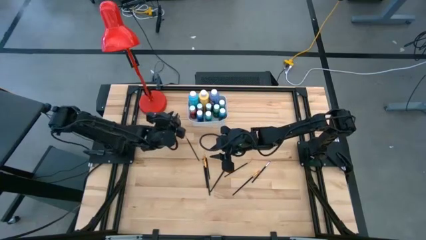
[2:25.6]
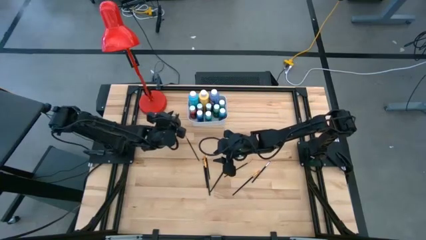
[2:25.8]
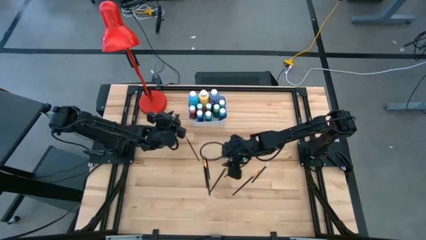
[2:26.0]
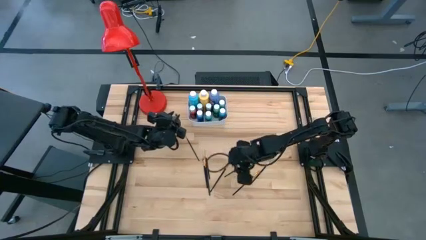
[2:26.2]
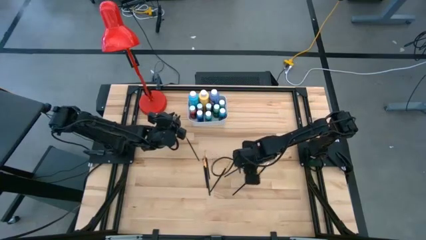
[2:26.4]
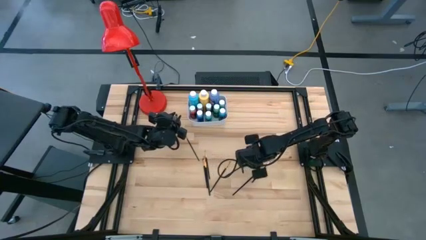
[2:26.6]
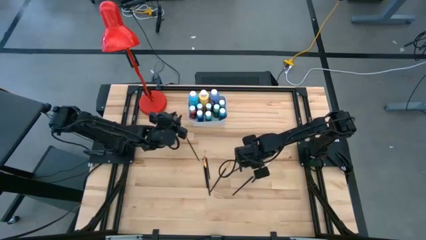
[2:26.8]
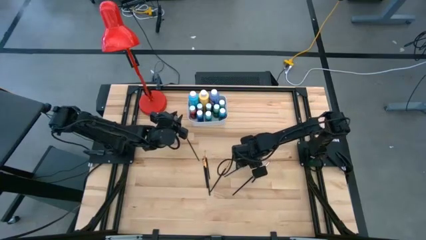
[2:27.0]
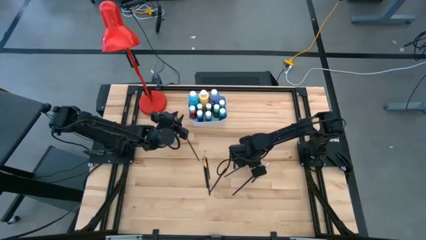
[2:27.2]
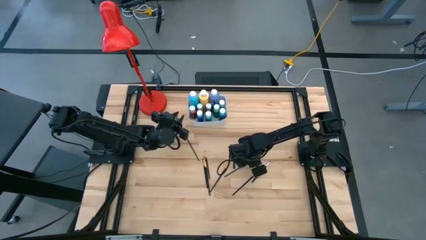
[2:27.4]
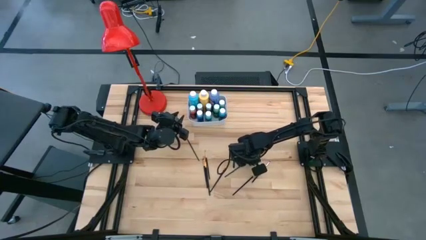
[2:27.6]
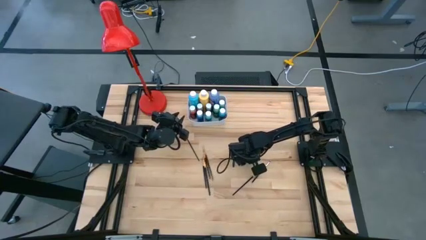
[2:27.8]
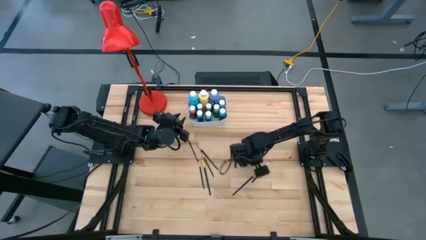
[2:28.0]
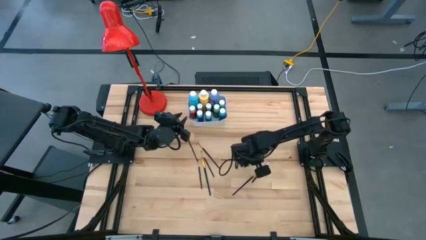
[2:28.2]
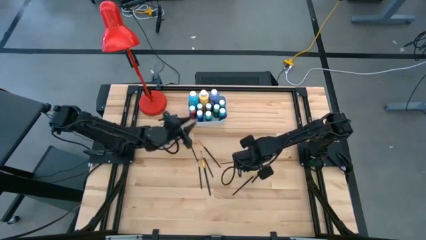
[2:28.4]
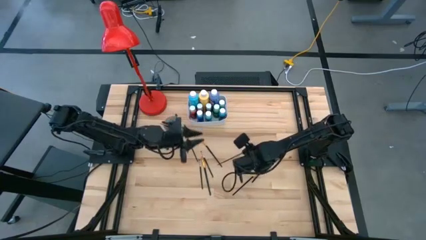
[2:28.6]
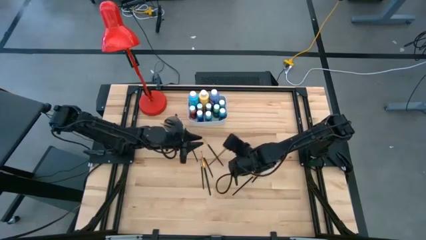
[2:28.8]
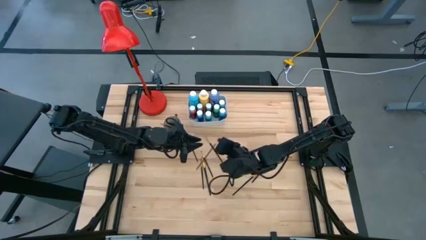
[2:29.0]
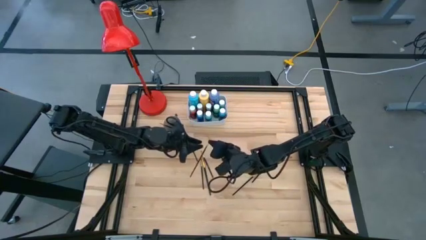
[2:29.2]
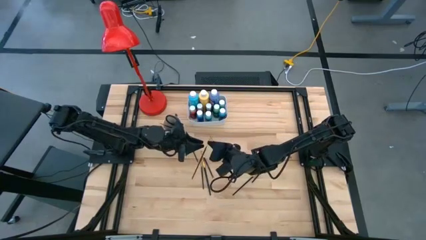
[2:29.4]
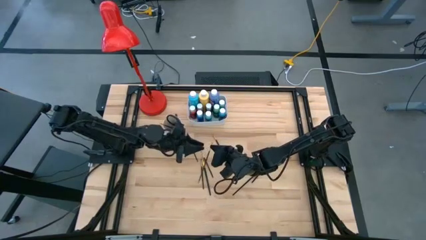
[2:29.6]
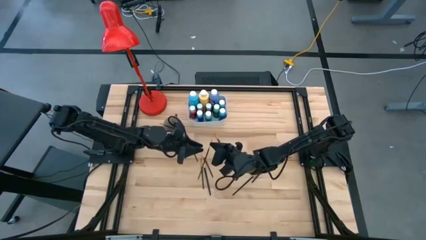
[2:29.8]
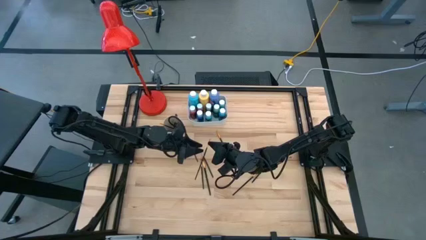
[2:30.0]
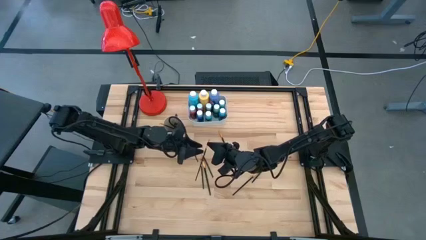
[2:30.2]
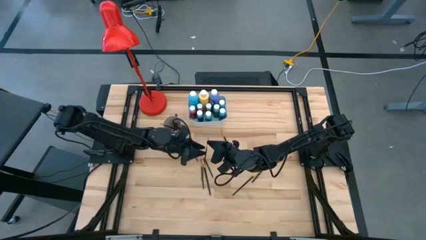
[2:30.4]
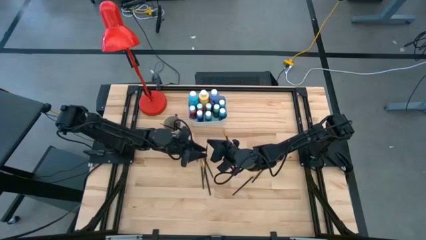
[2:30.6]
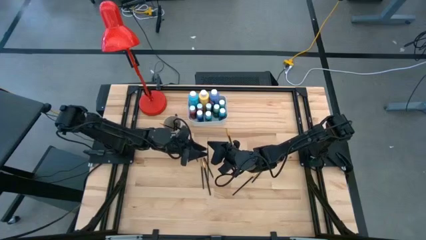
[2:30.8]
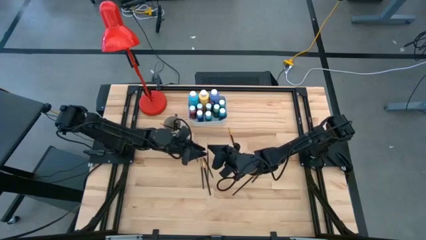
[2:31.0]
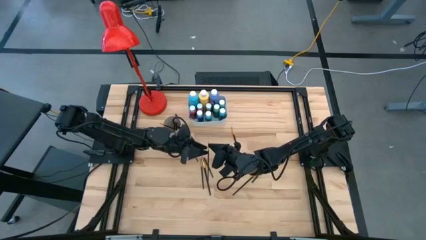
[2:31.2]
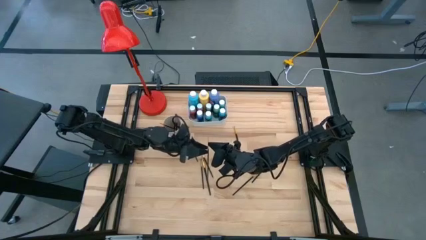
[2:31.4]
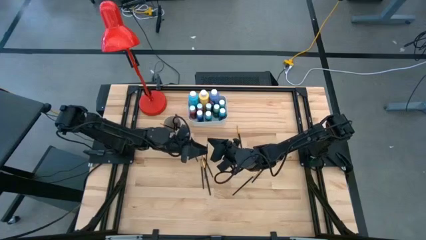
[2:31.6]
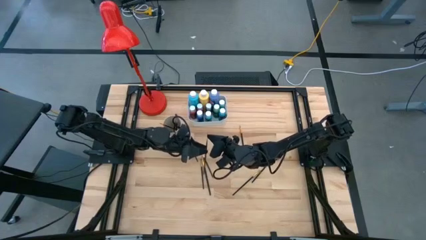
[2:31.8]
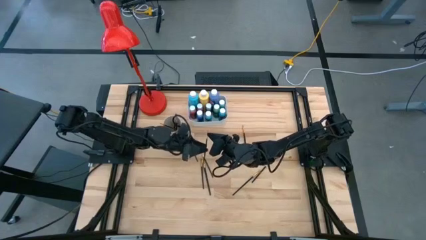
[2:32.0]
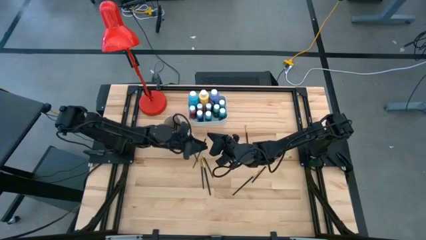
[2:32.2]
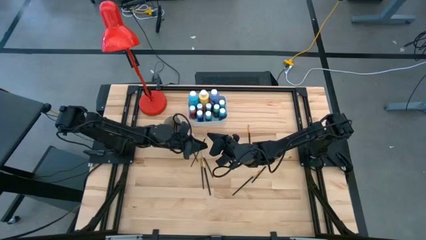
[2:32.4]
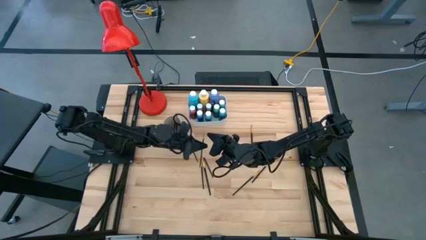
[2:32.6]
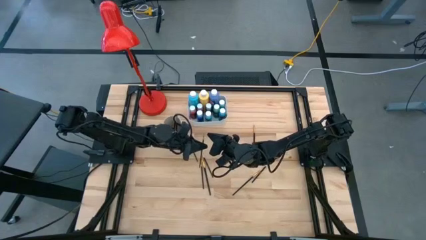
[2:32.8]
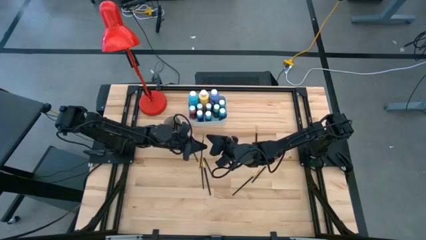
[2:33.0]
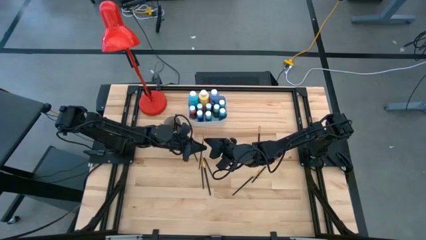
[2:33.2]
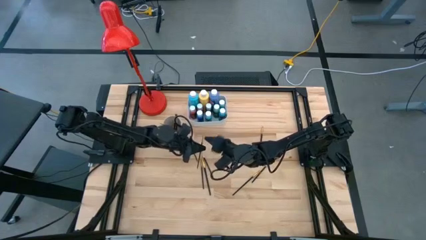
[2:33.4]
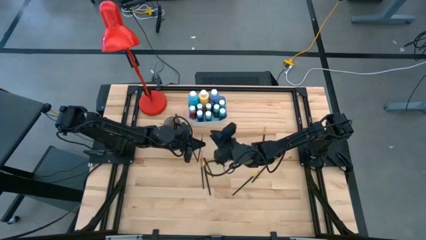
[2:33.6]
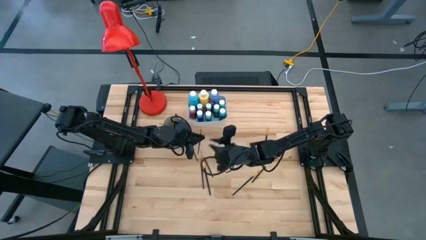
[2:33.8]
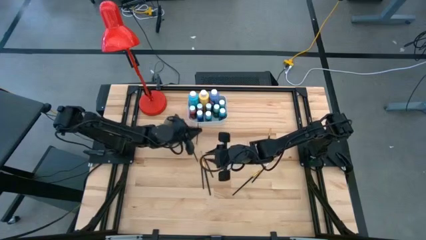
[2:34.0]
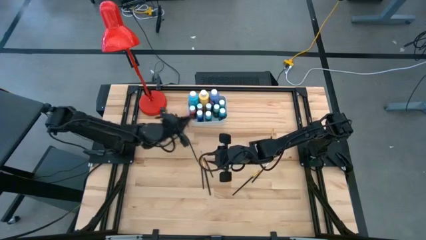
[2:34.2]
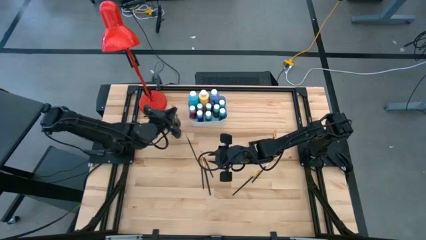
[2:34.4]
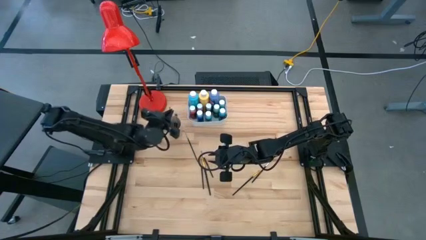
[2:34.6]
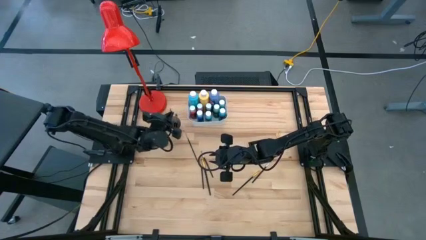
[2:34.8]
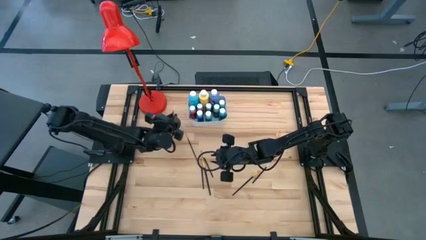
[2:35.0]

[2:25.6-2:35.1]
Task: Pick & Place Paint Supplies
Put the black paint brush into the white cup

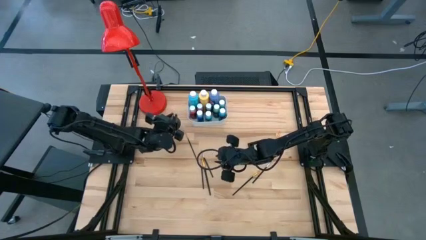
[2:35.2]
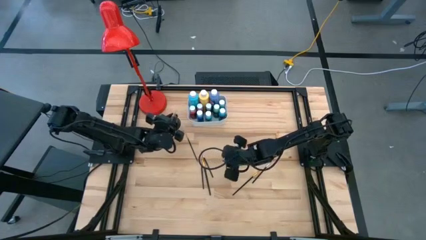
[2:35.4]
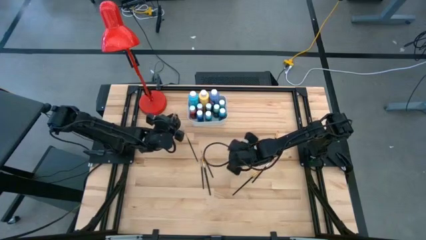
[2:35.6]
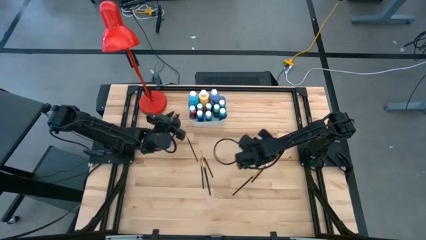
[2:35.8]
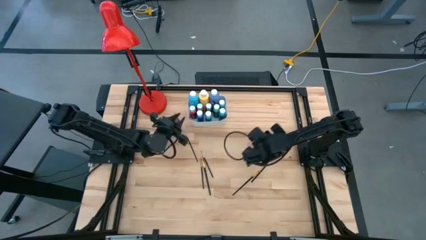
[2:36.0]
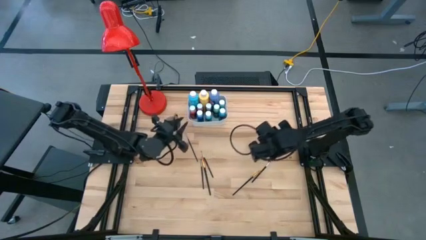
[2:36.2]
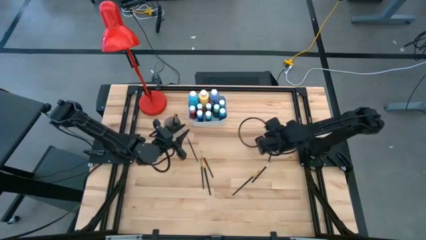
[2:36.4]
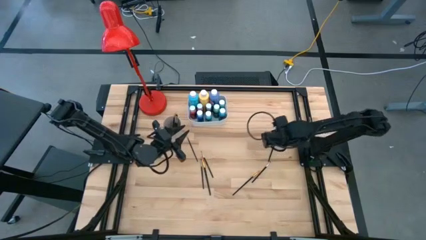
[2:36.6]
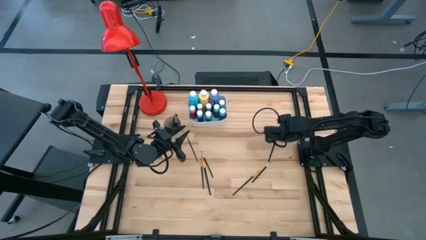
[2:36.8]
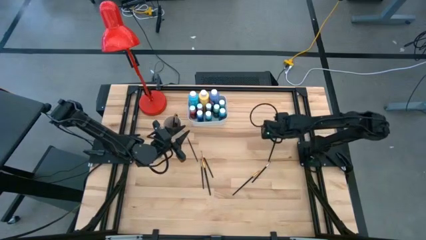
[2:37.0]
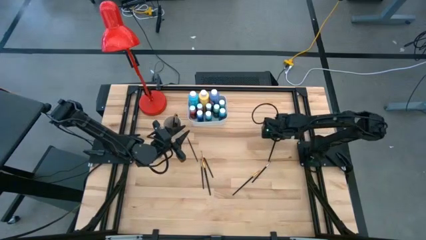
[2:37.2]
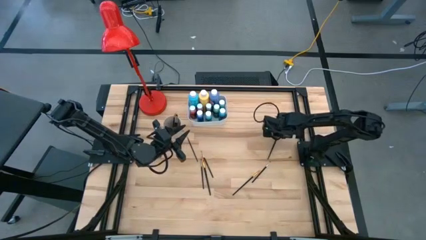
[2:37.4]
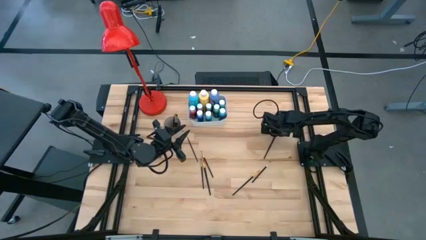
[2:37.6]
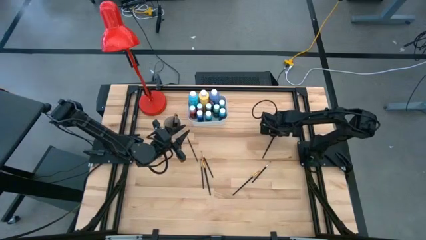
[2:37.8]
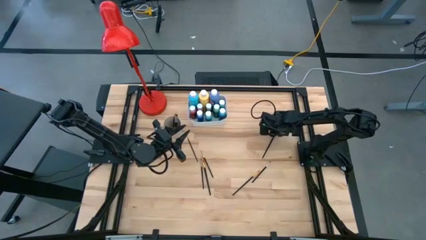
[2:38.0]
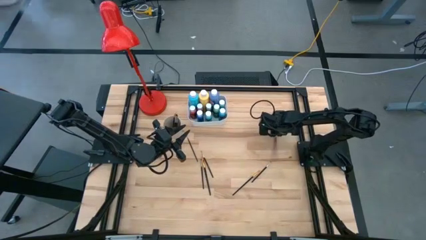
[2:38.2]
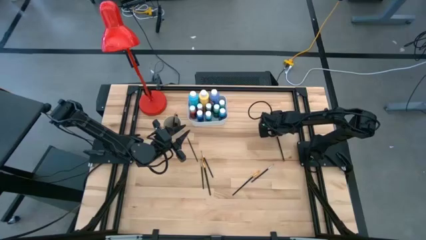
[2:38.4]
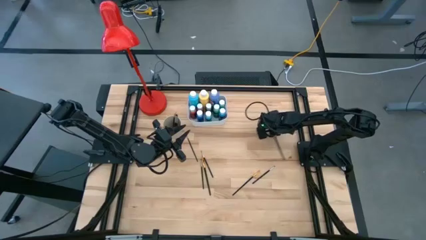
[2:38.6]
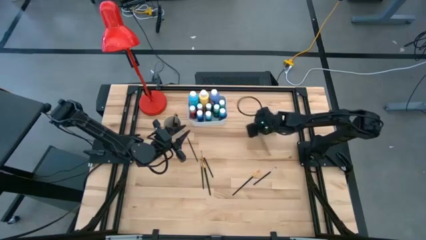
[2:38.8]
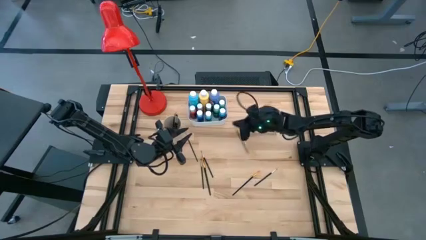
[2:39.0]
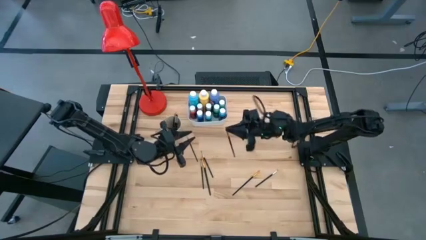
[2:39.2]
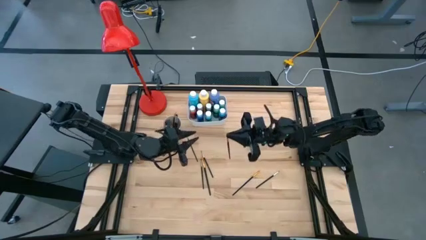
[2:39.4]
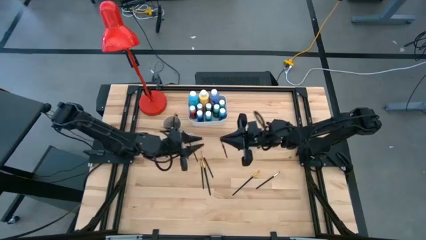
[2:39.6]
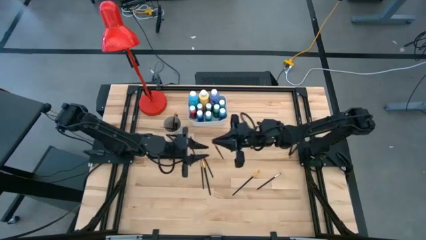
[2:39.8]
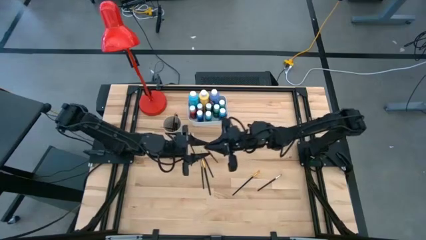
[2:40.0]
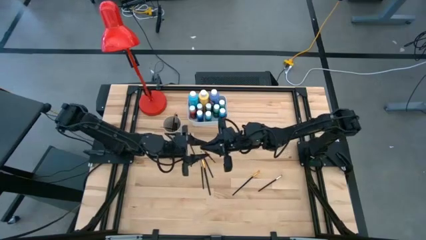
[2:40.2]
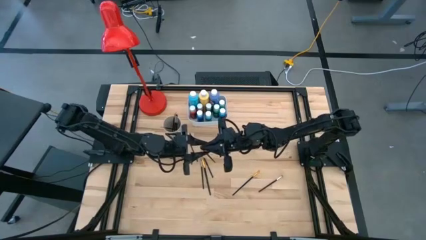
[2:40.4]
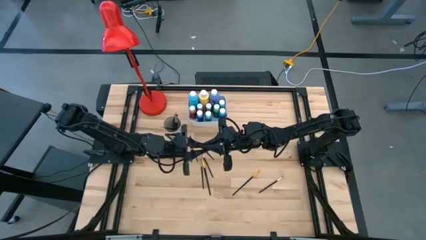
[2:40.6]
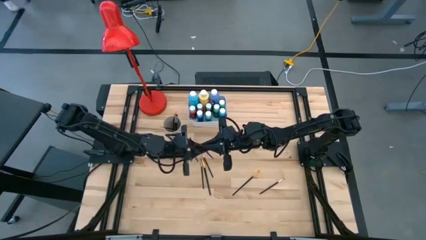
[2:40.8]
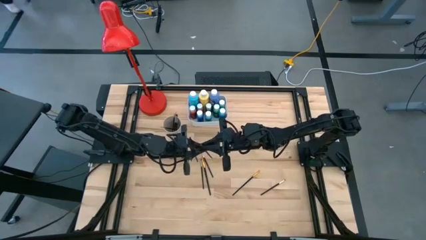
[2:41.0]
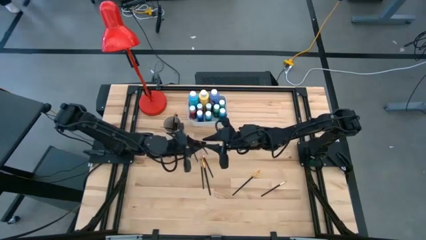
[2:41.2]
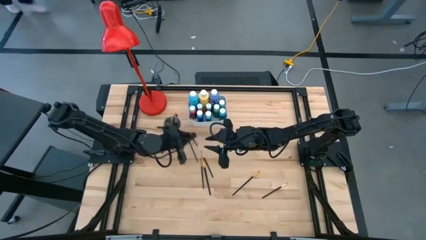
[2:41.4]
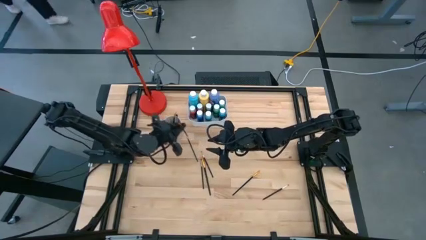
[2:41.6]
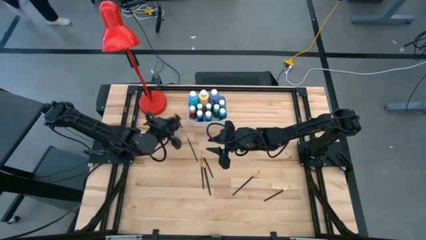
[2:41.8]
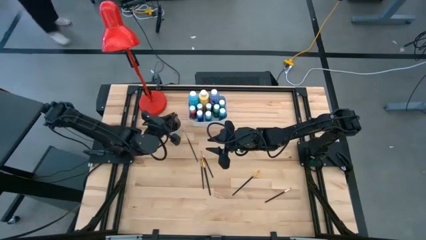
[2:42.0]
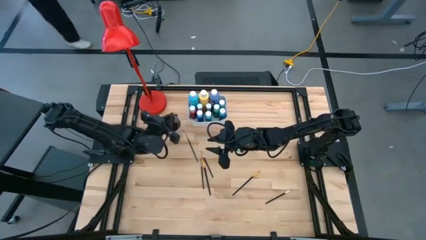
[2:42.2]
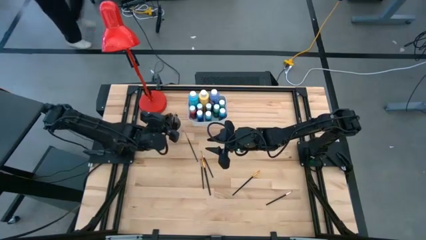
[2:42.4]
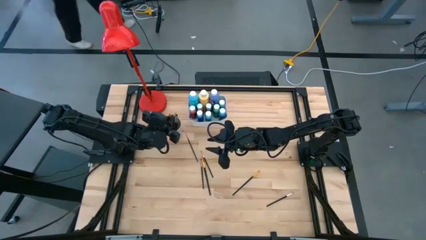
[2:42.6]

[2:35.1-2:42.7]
Put the black paint brush into the white cup
